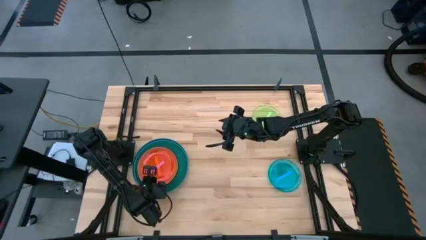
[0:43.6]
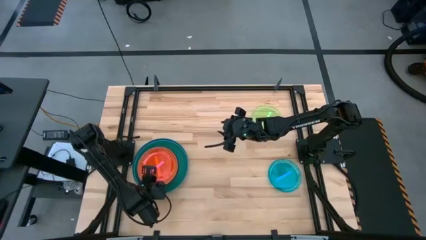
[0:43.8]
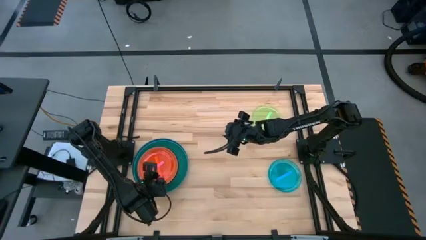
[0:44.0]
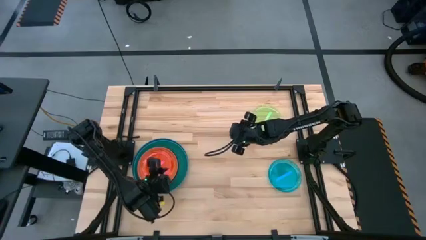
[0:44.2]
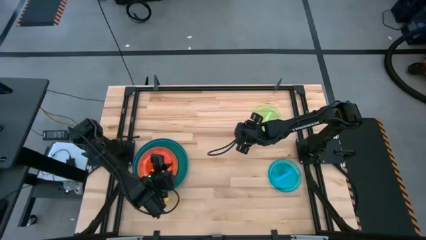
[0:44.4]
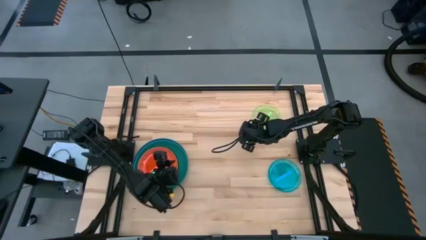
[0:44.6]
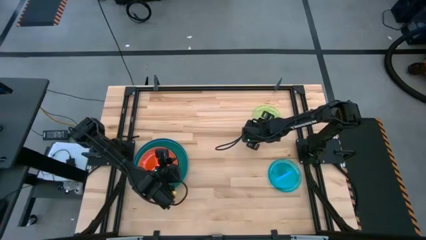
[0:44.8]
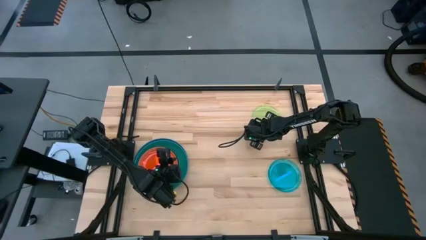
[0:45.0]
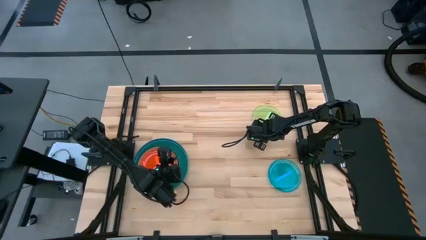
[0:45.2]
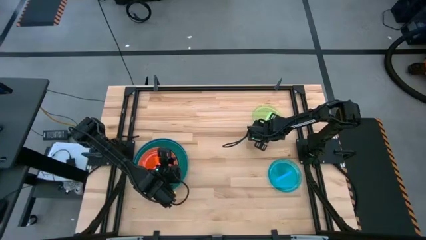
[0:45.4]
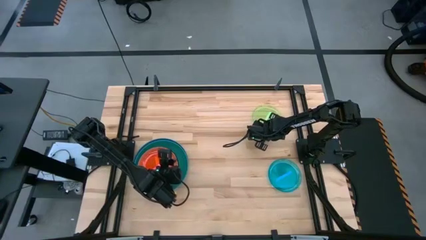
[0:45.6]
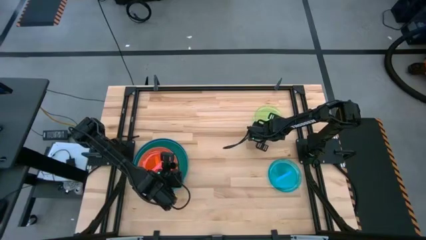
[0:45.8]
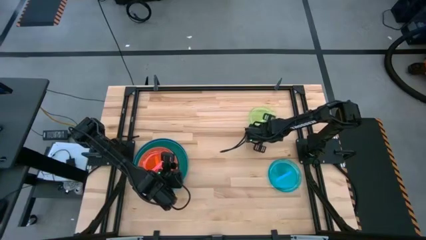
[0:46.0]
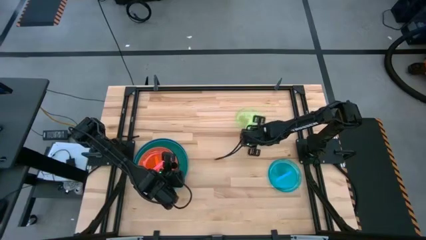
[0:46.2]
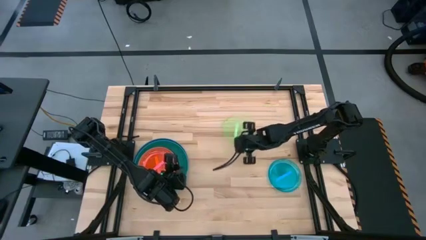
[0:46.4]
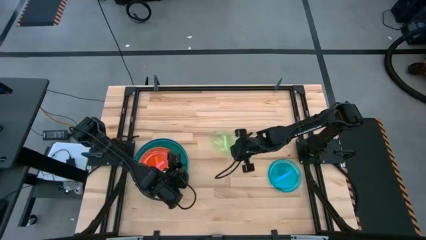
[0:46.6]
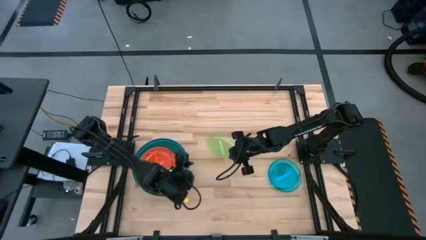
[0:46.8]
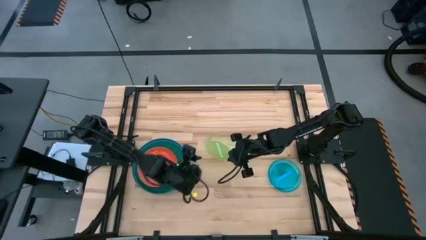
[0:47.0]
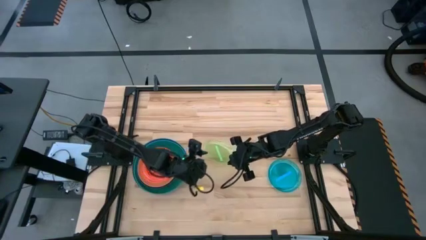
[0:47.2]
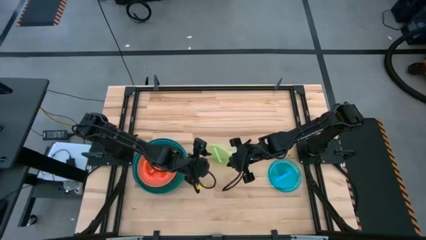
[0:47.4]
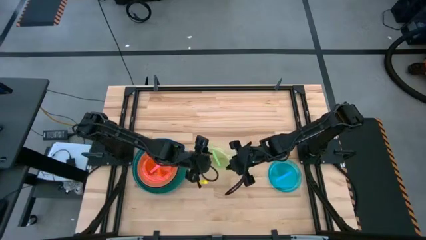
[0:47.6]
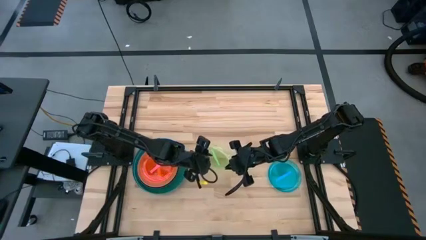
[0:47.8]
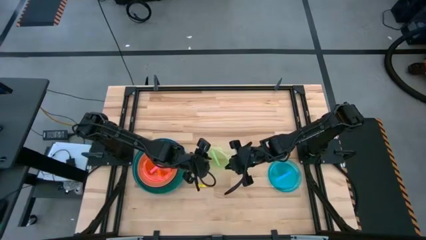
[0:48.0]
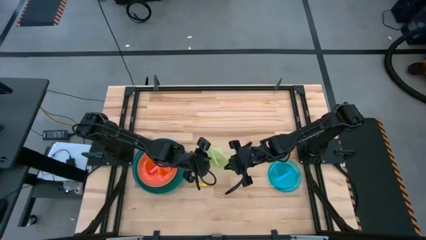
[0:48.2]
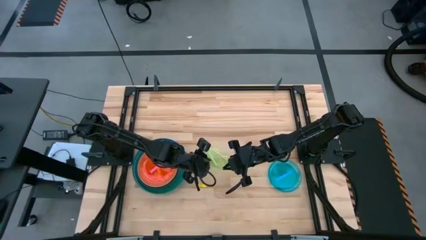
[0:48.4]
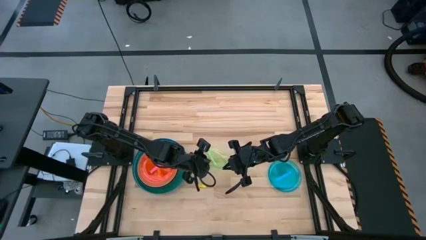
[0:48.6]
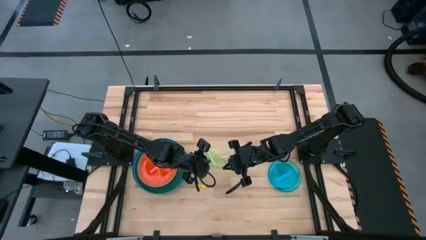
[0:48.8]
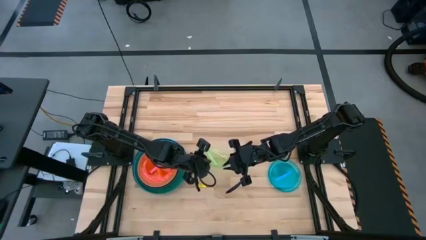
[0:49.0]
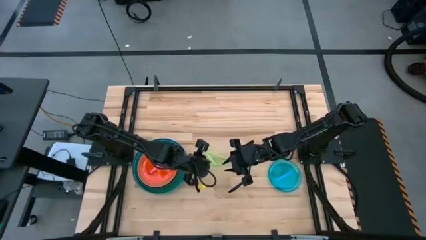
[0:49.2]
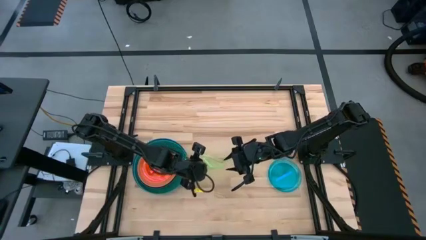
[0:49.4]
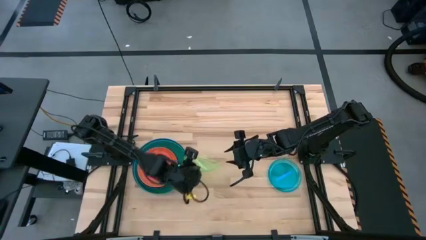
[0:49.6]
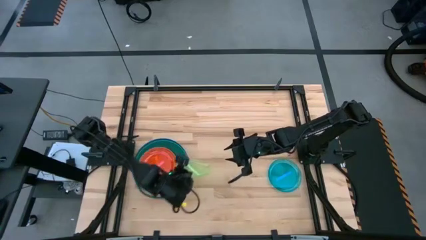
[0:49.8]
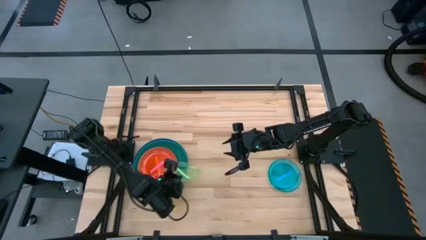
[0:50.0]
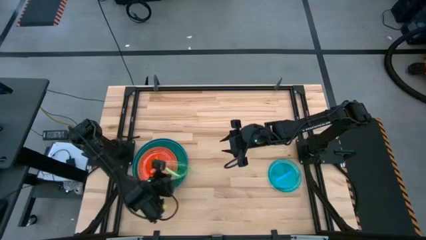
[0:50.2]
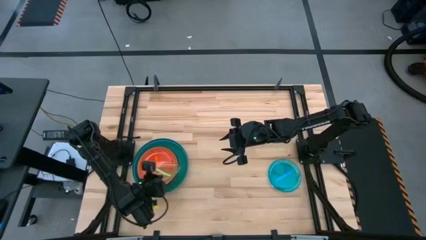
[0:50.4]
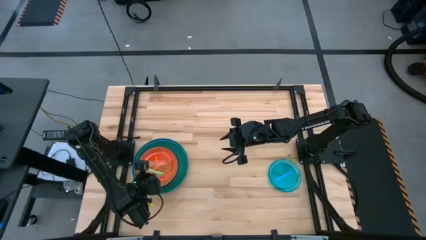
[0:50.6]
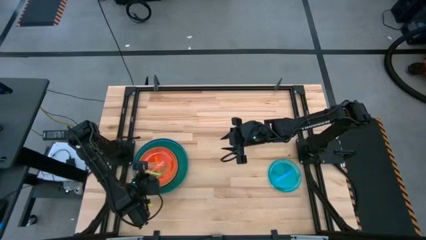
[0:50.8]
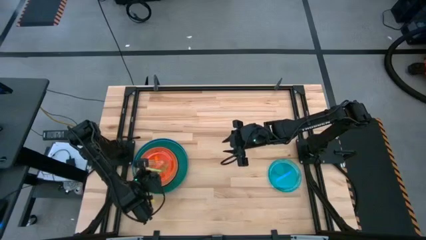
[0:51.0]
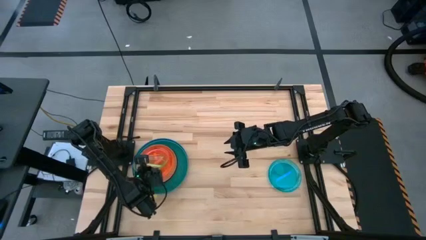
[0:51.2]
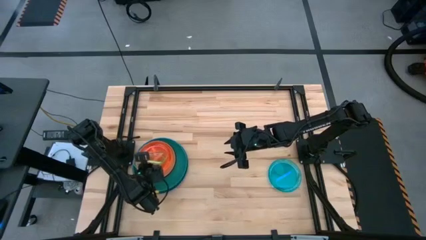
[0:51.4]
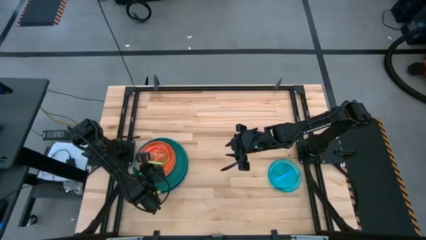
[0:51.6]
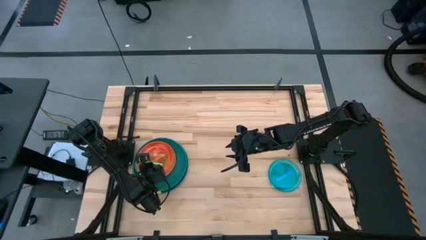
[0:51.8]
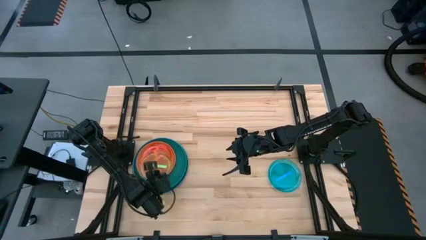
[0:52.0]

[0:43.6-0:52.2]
Task: Stack plastic plates
Stack the light green plate on top of the pink plate

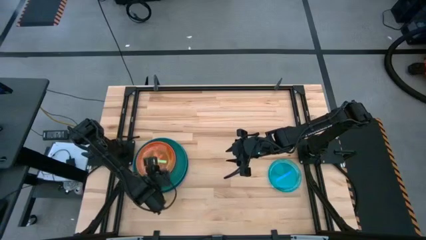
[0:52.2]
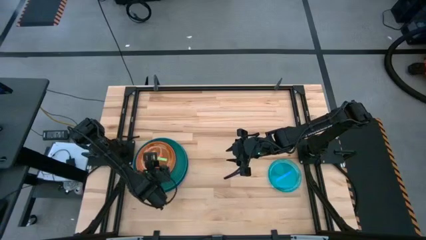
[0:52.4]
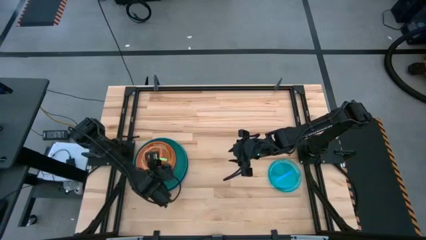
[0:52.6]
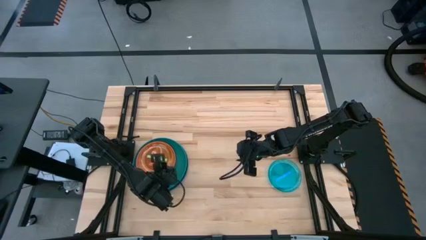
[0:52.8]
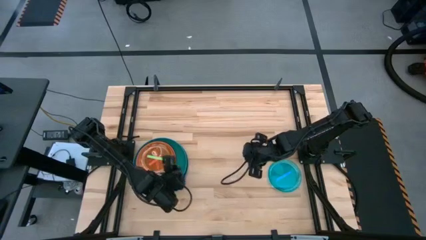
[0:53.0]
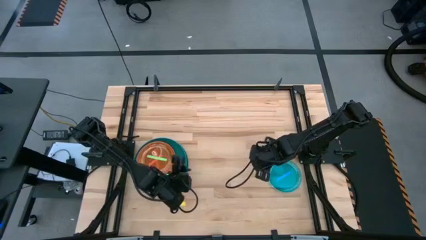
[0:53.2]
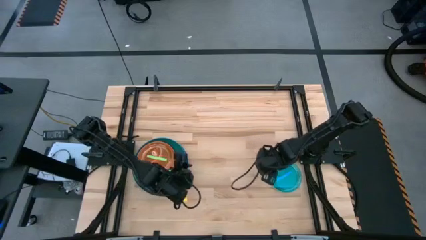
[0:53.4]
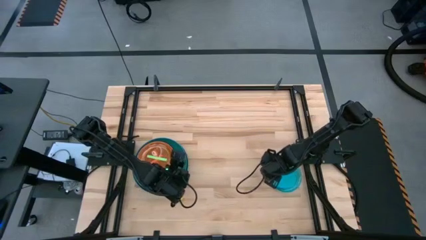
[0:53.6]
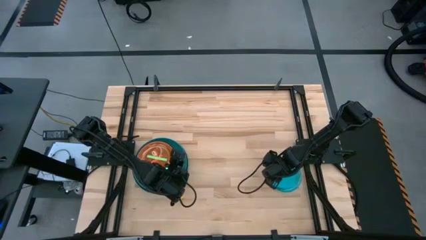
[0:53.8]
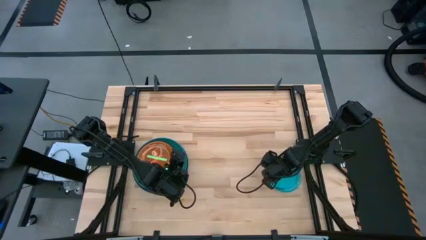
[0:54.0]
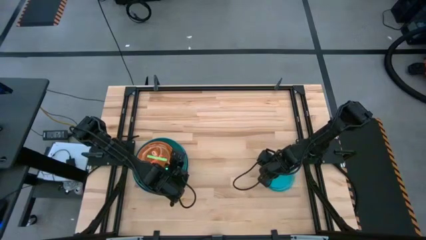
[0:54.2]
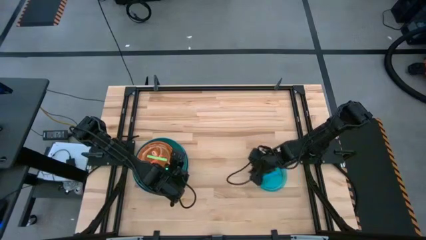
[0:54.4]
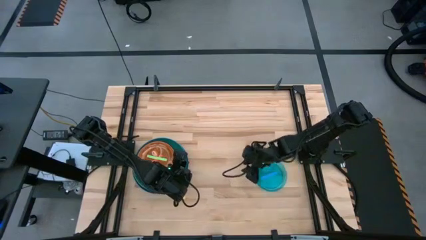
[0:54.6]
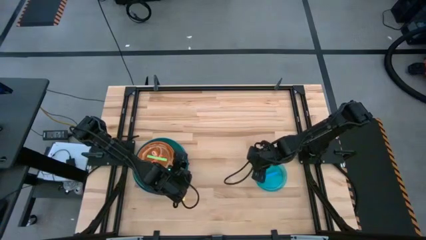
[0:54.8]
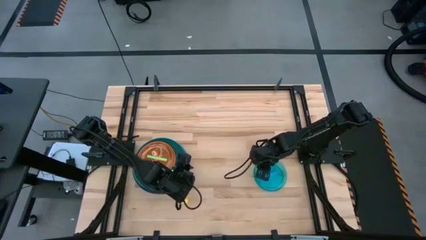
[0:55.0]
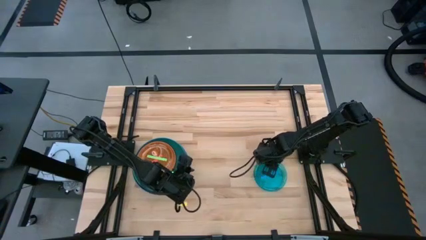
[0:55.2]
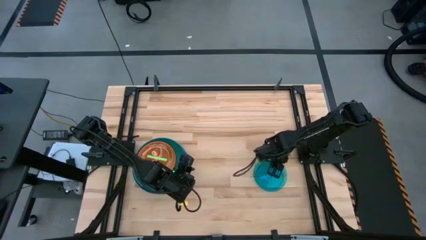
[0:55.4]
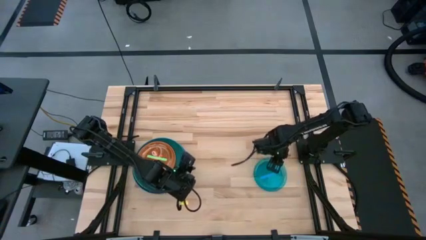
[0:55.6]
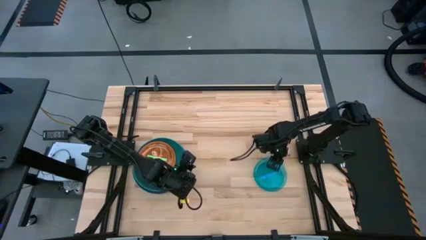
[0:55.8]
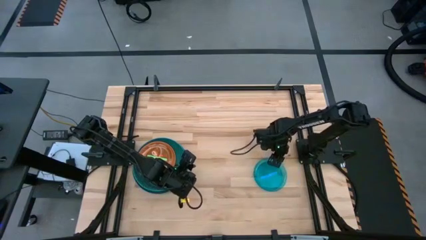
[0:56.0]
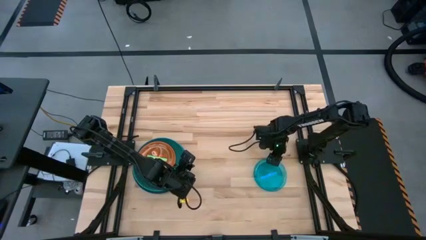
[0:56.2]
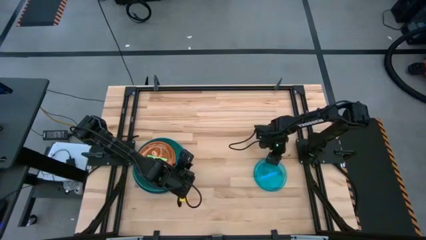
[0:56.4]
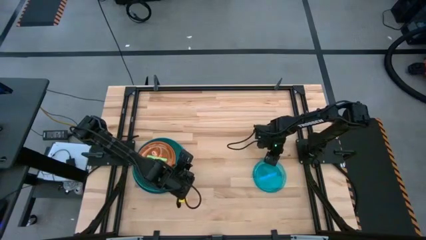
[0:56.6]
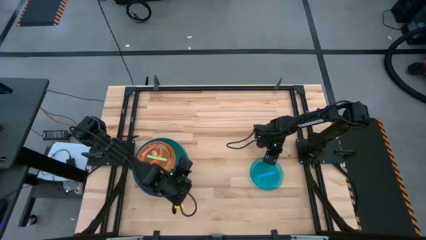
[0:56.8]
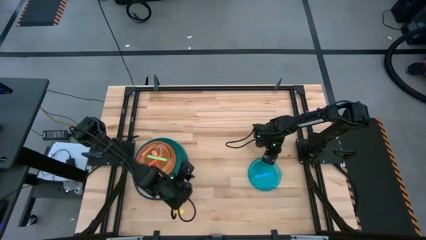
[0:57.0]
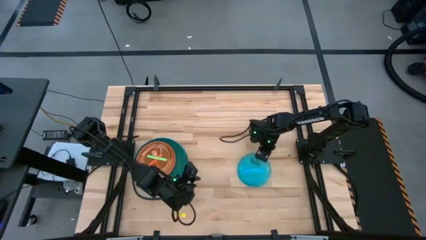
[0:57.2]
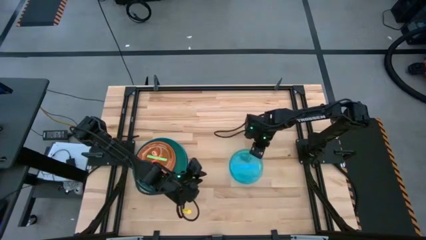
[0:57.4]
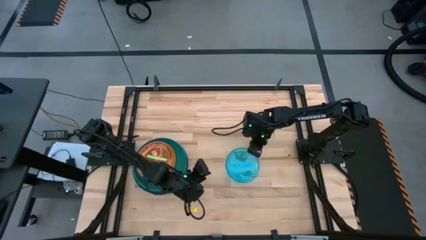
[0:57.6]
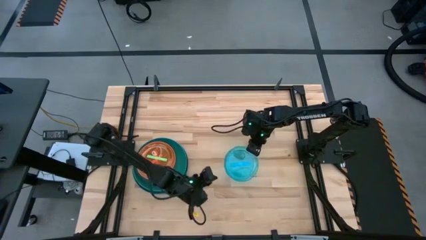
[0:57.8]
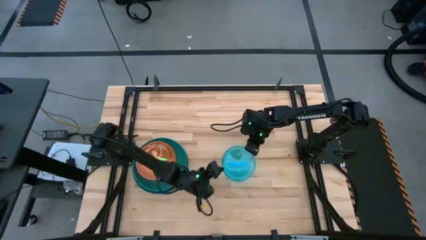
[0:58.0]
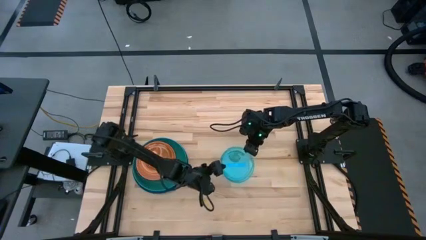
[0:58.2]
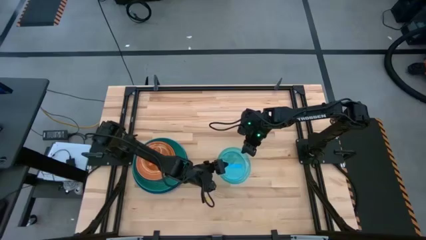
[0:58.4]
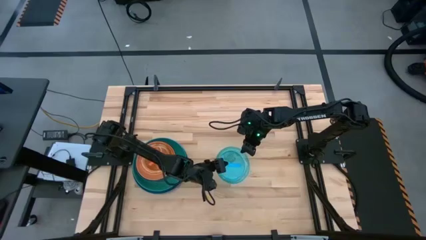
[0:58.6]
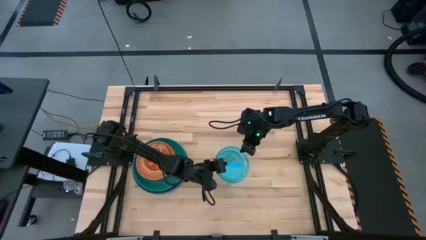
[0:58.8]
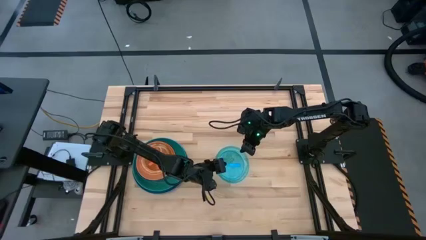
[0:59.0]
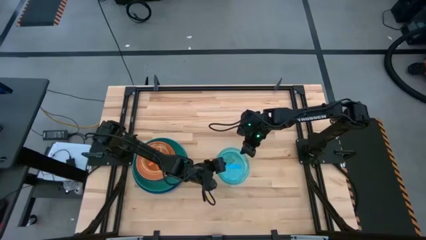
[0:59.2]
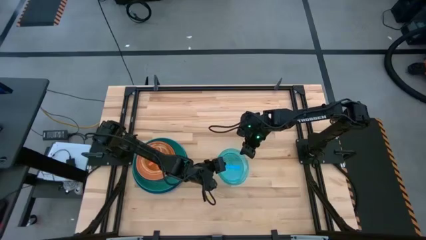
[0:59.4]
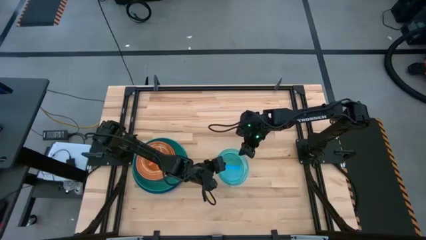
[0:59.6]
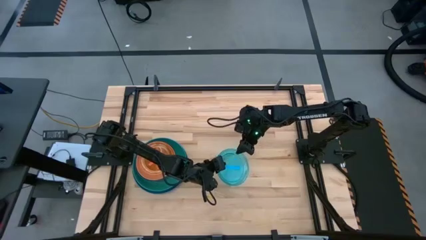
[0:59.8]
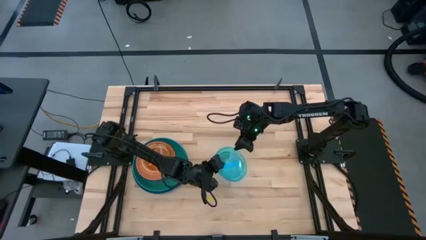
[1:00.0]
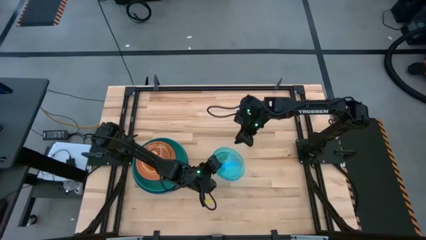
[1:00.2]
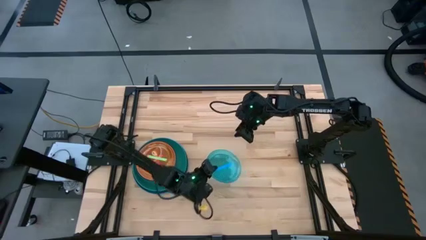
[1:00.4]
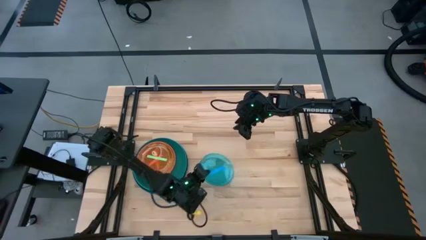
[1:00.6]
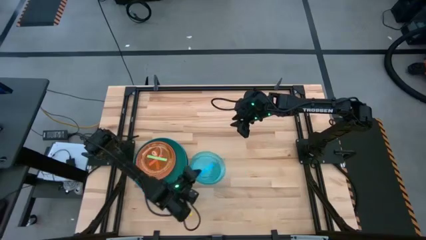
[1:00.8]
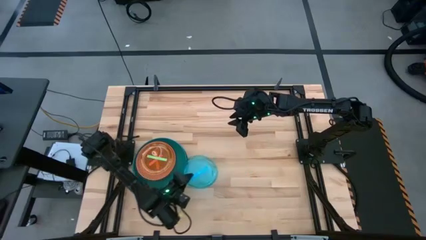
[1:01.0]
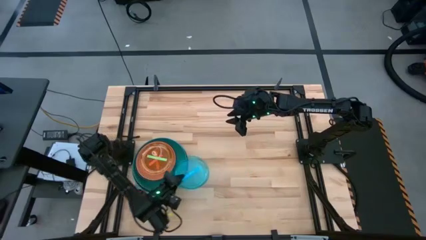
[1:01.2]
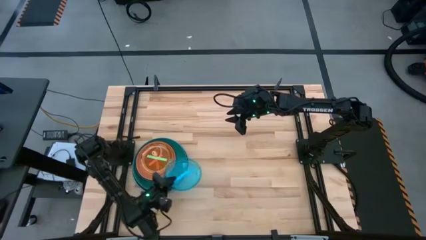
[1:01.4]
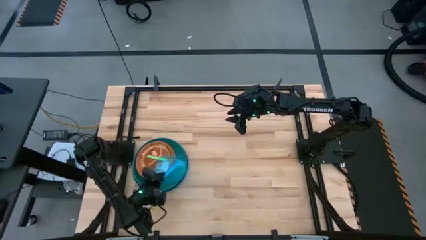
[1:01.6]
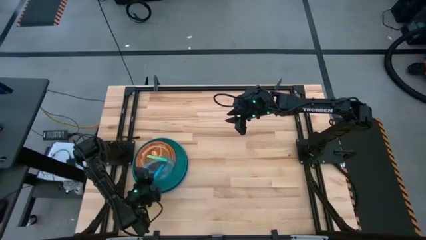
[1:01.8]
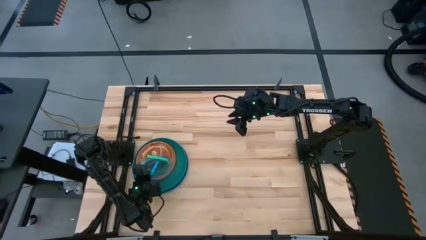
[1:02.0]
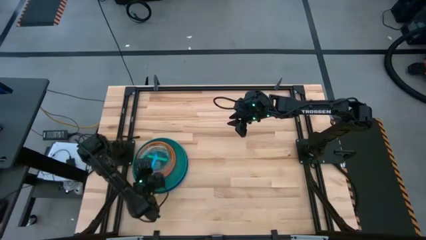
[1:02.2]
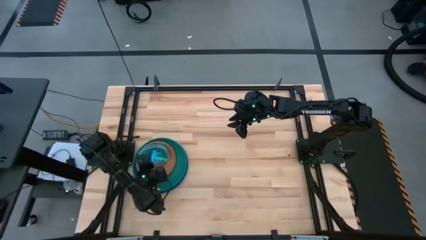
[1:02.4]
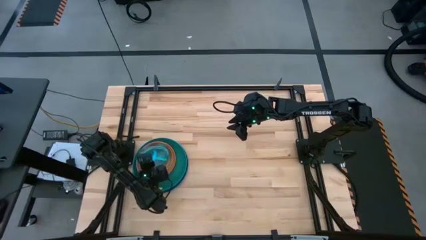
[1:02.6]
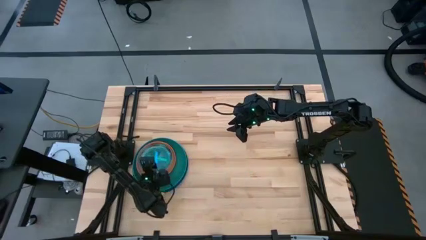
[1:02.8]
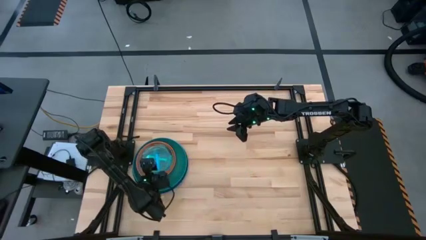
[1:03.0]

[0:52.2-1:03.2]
Stack the light blue plate on top of the light green plate
